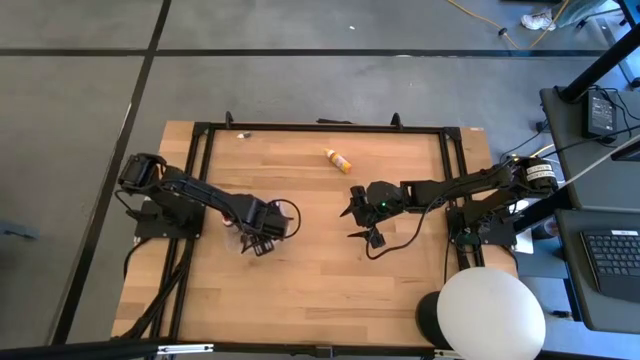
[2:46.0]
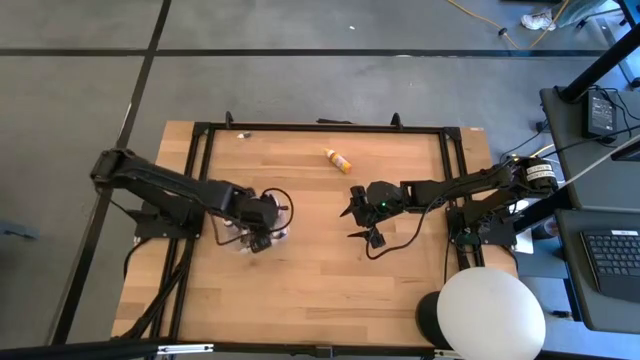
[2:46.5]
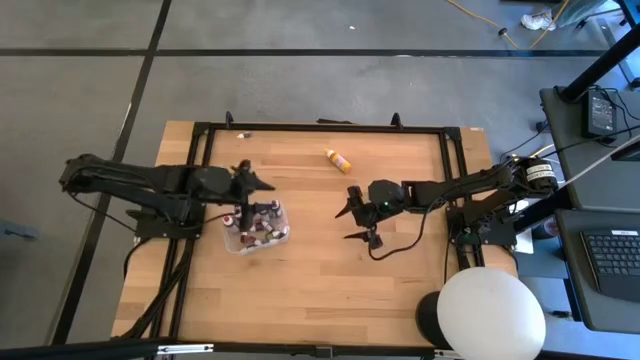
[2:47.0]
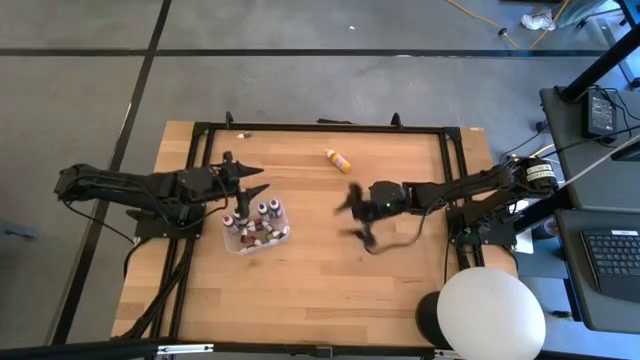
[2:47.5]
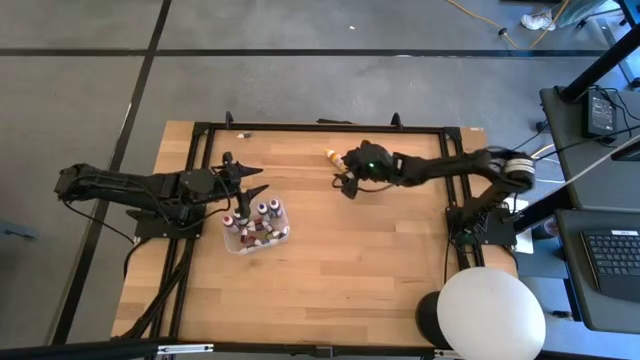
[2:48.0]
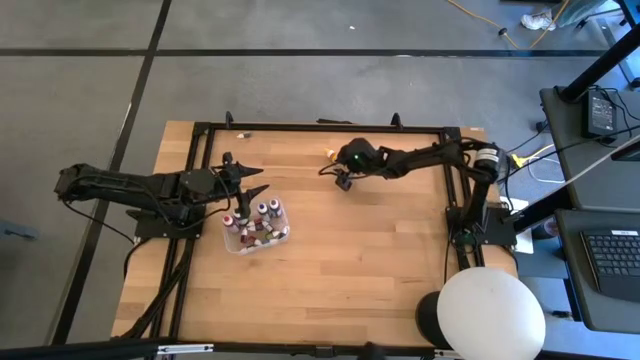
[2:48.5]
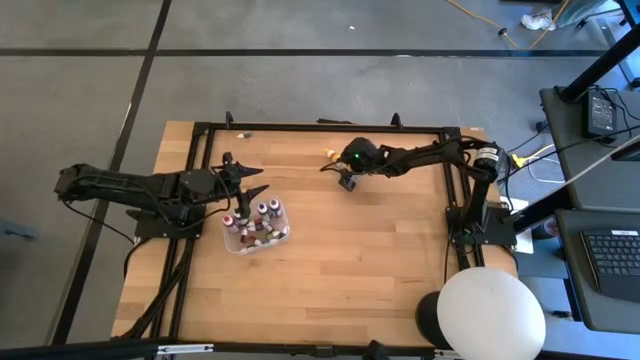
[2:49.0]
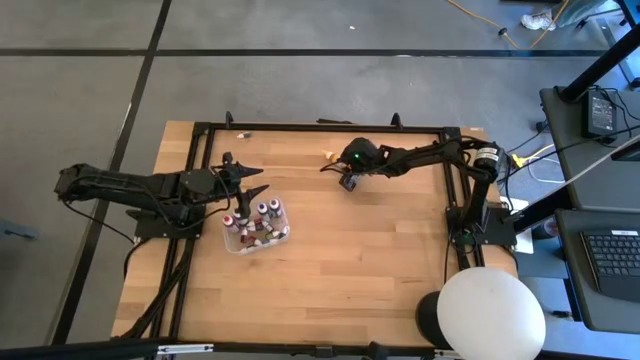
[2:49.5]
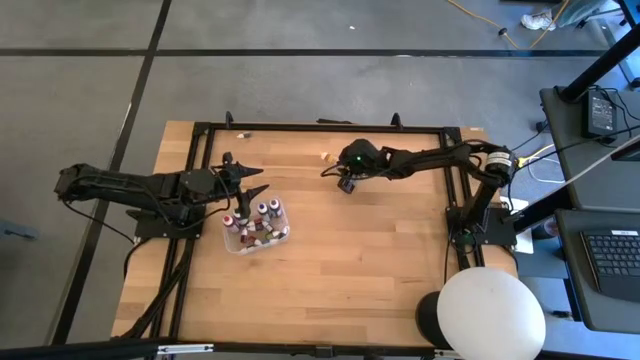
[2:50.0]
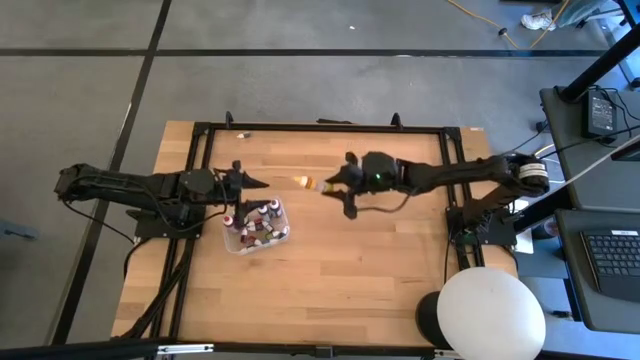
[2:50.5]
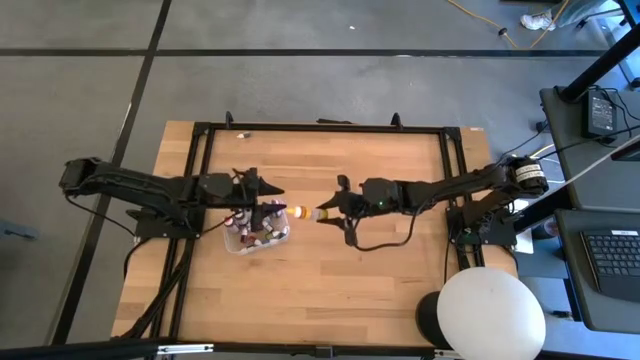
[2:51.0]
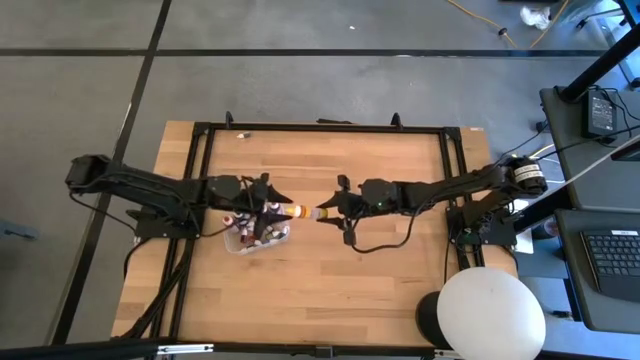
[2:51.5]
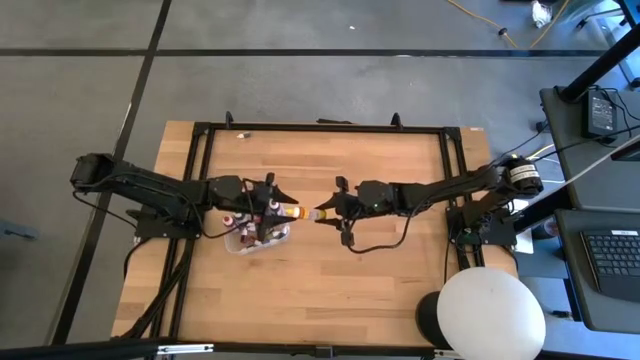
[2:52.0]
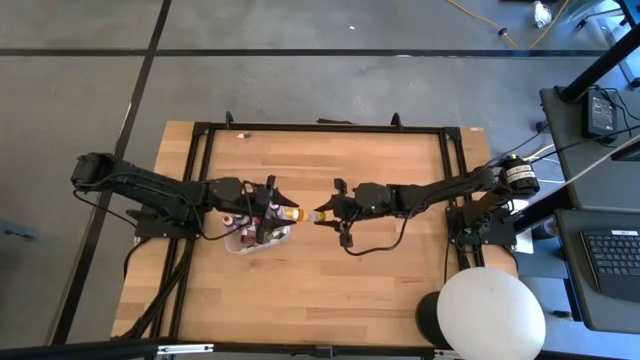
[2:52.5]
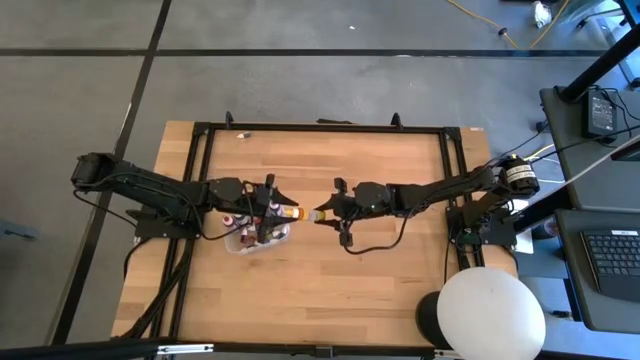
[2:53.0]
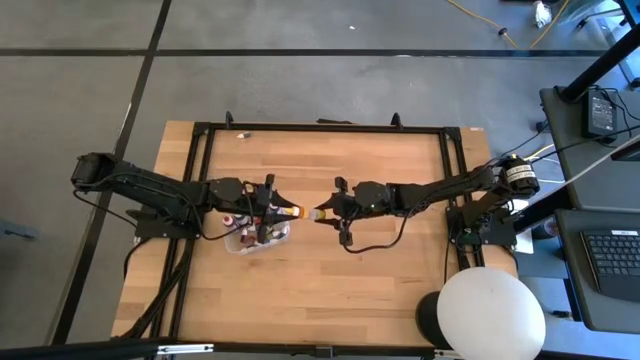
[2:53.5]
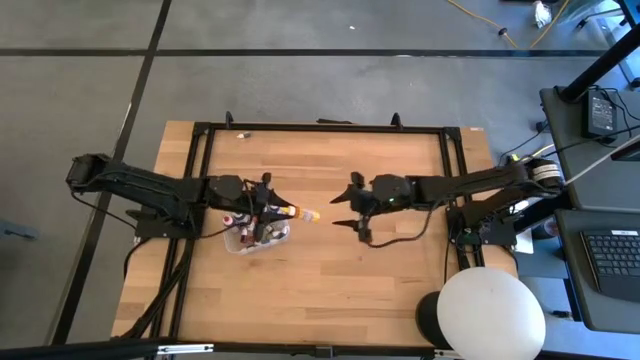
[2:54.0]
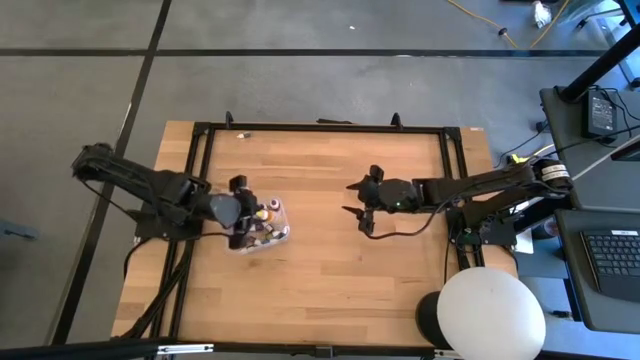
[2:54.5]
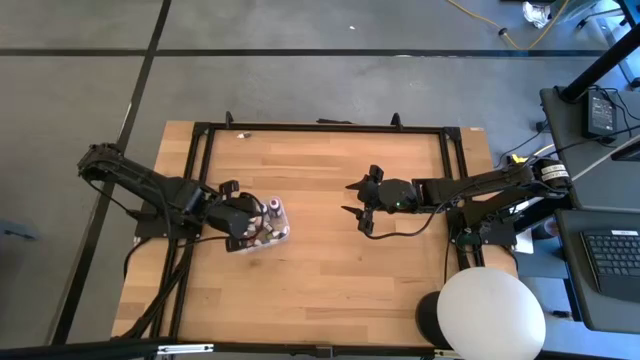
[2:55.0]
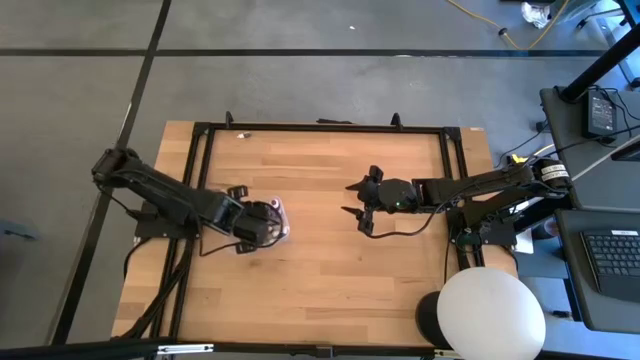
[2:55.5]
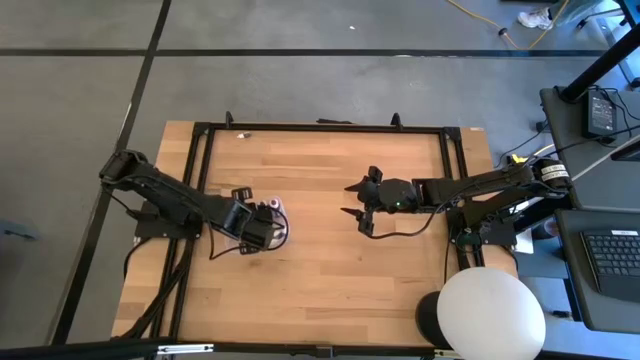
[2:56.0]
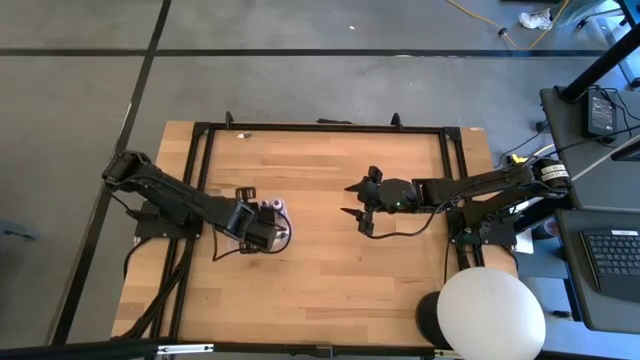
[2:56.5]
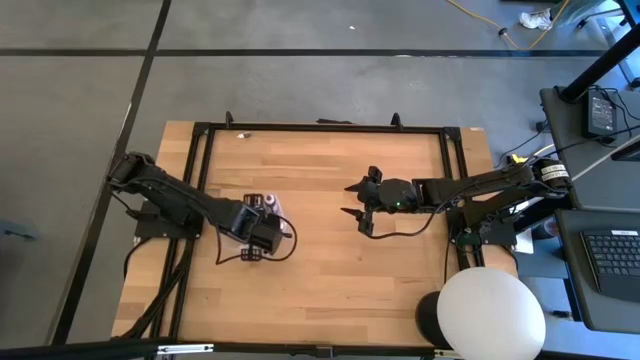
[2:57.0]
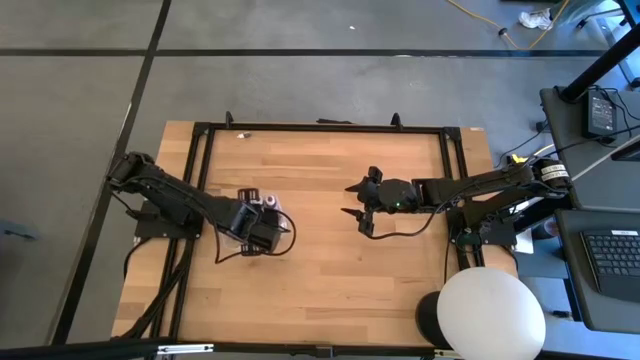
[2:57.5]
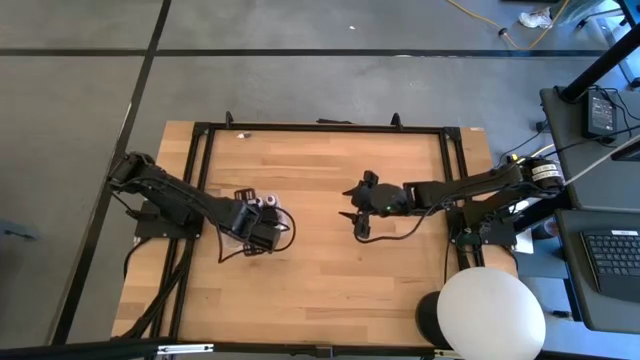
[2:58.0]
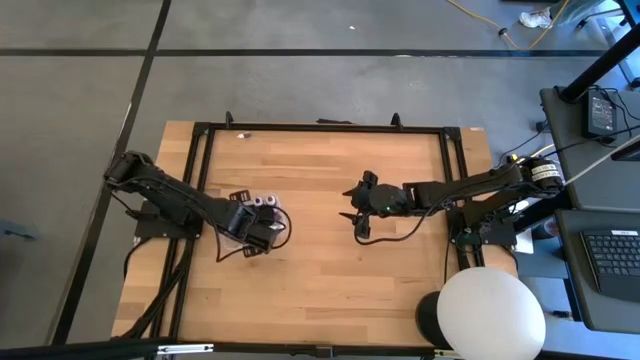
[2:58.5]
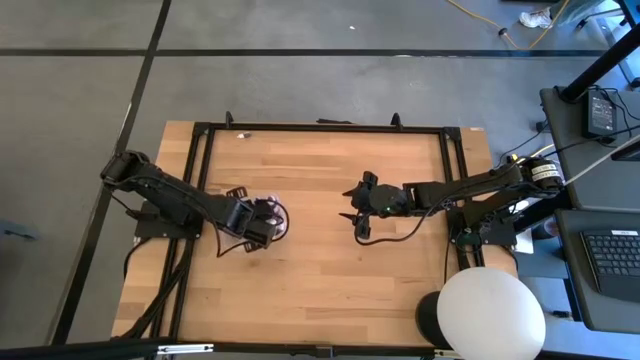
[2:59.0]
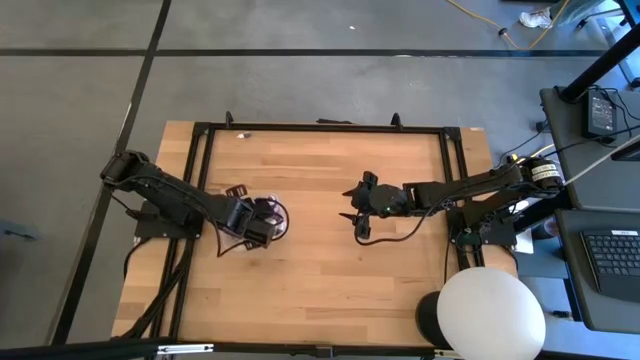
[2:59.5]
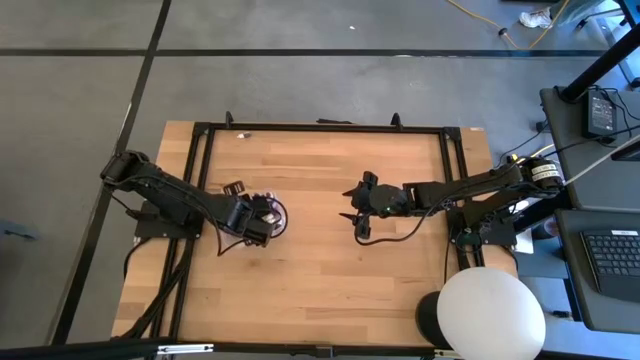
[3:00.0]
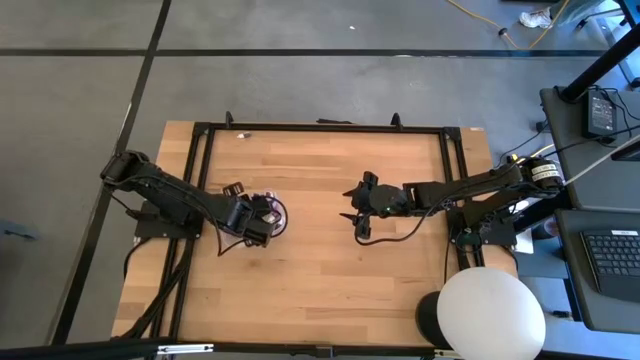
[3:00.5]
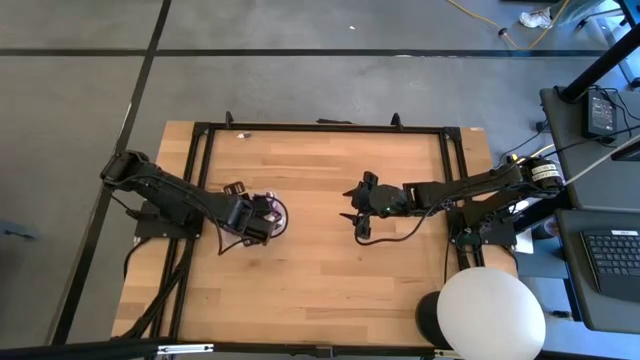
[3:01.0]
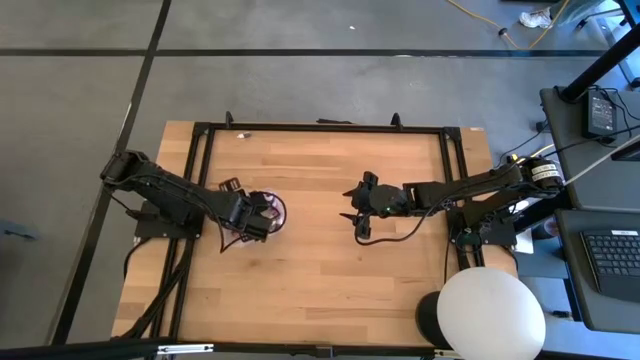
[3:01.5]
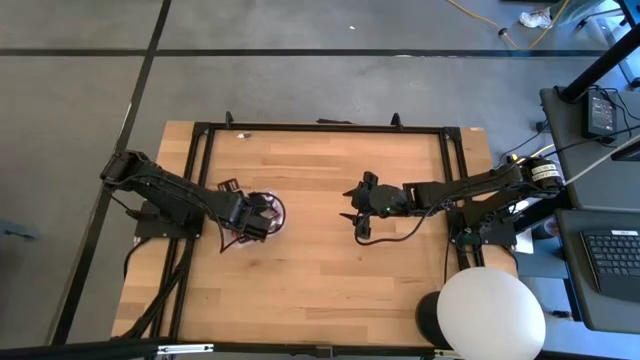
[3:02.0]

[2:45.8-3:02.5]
Task: Pick & Place food coloring
Put the large yellow food coloring bottle into the transparent bin

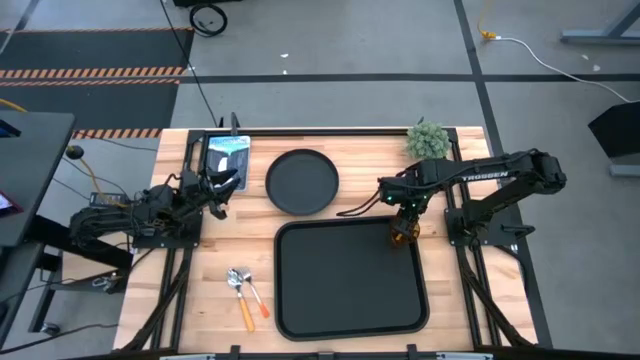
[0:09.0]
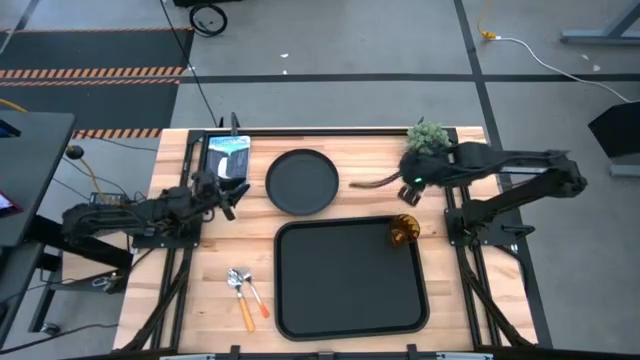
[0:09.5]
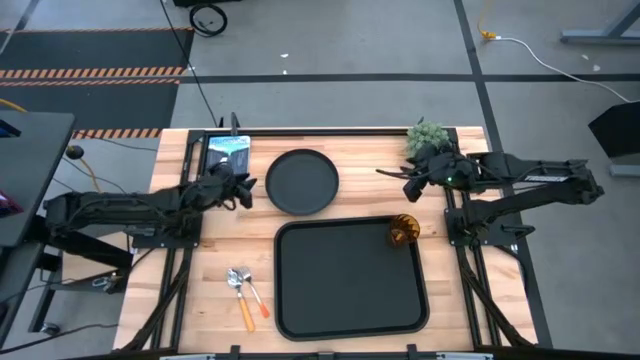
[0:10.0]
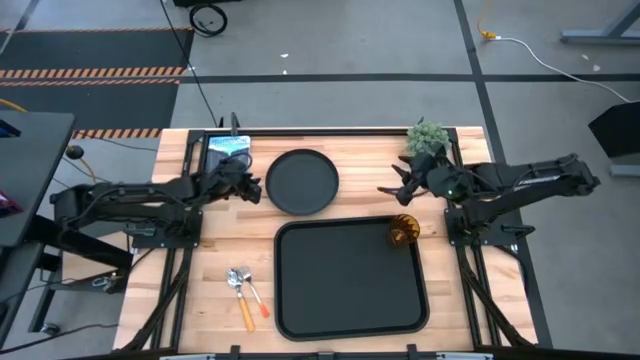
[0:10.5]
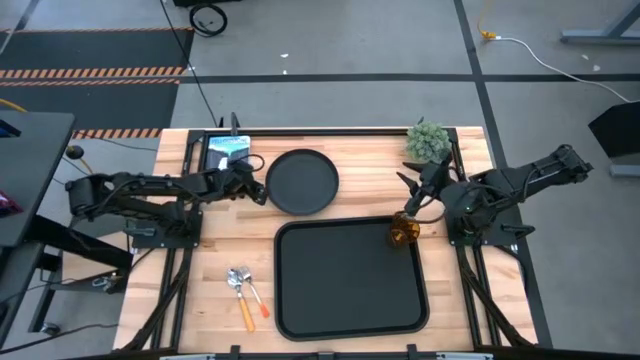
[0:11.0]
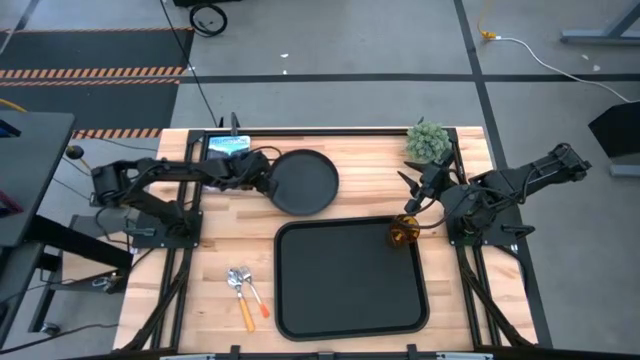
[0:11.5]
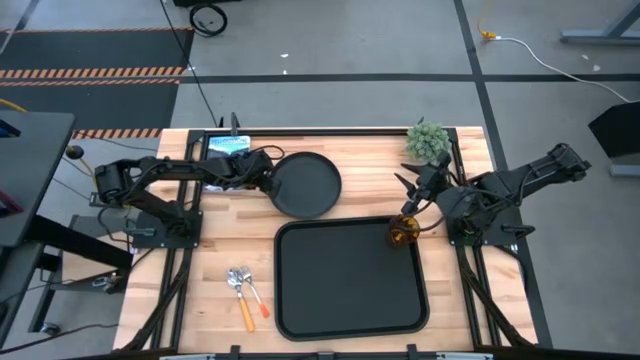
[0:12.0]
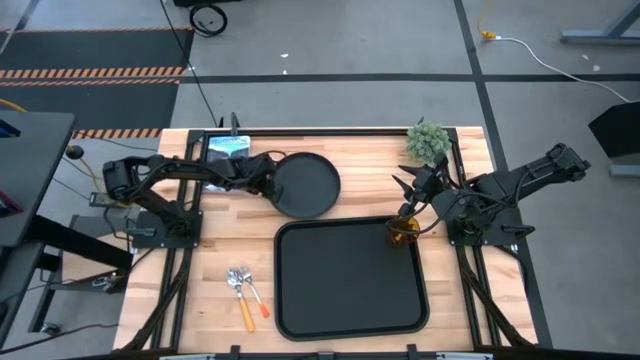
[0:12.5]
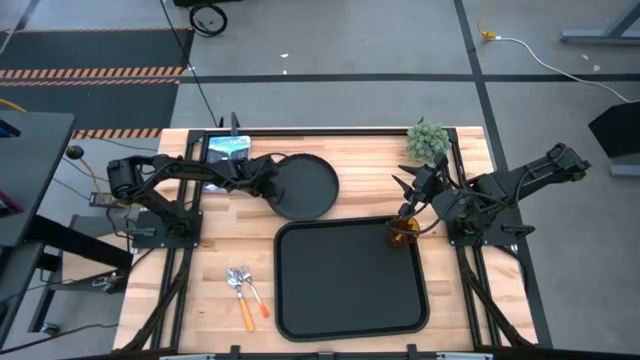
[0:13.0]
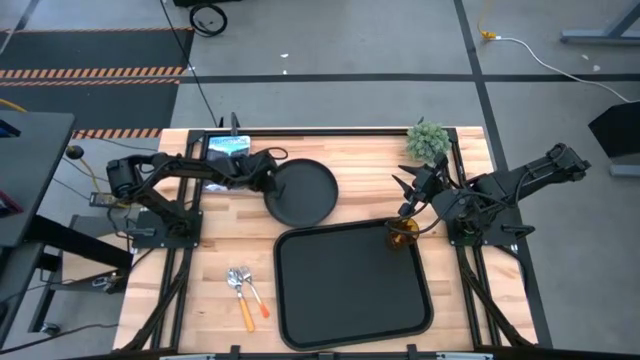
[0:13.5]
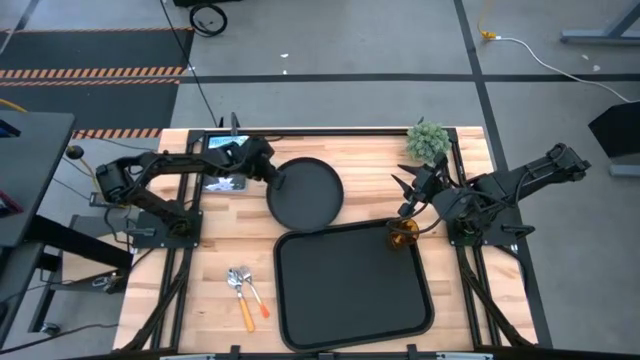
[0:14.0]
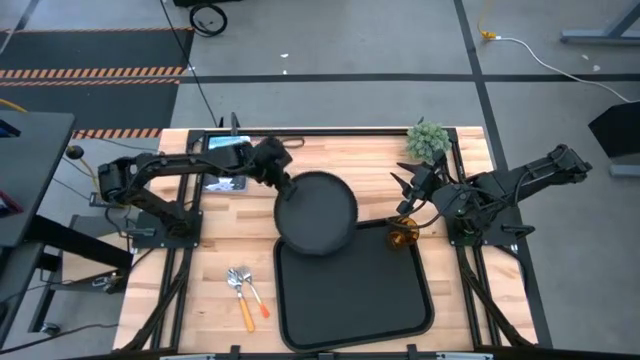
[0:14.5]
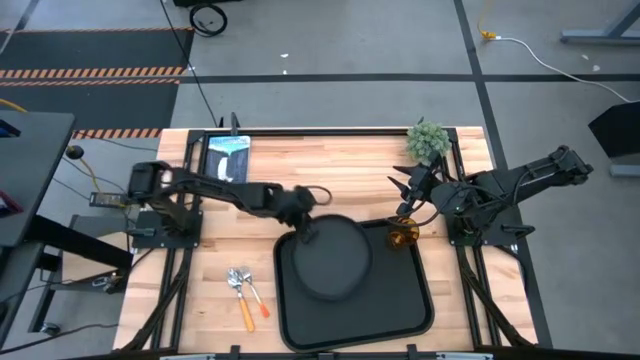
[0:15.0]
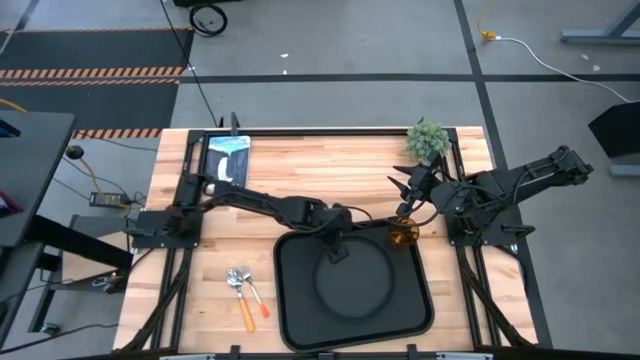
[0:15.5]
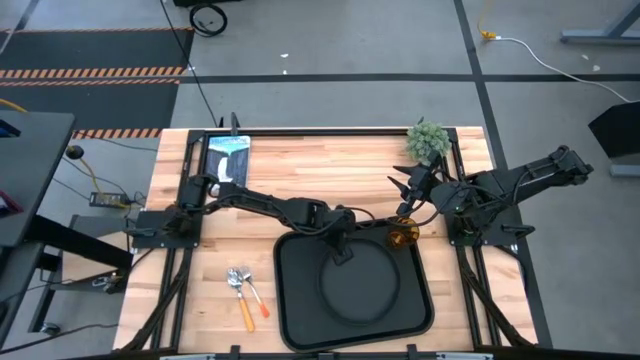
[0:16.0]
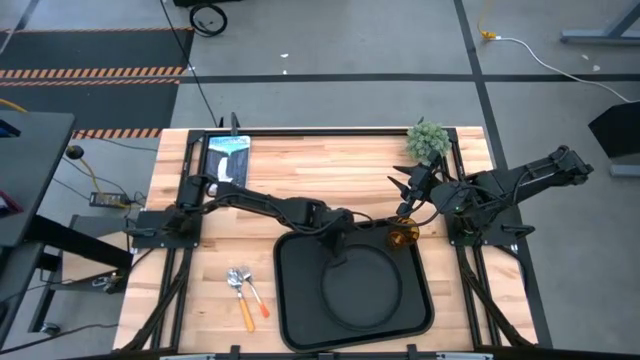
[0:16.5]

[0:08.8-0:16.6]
Task: Pick and place plate/cup/fork/spoon on tray
Put the black plate on the black serving tray to the bottom left of the brown cup
